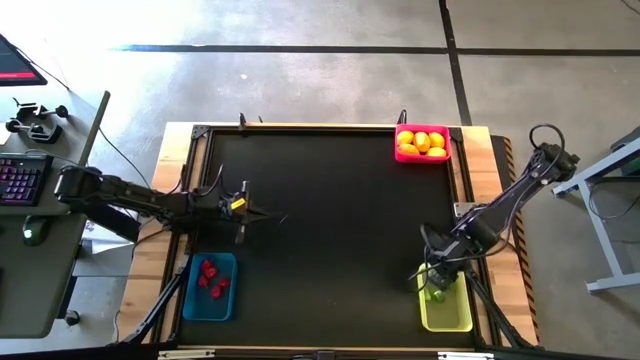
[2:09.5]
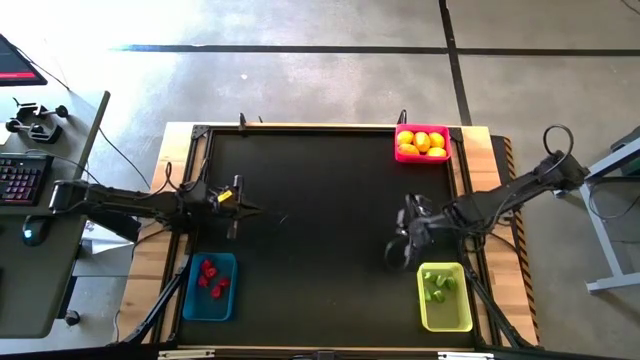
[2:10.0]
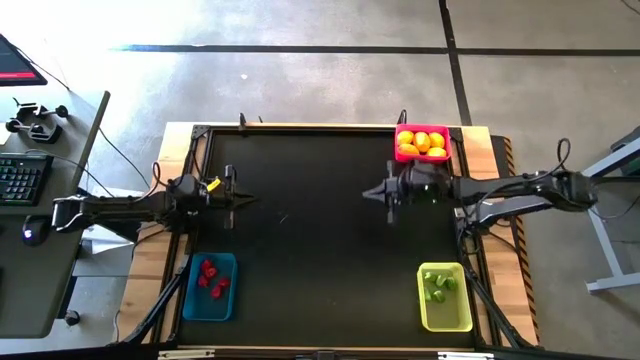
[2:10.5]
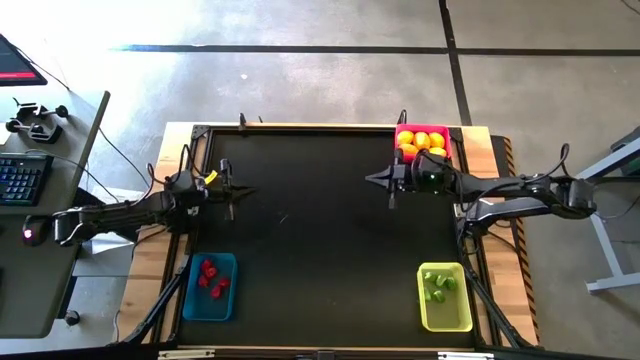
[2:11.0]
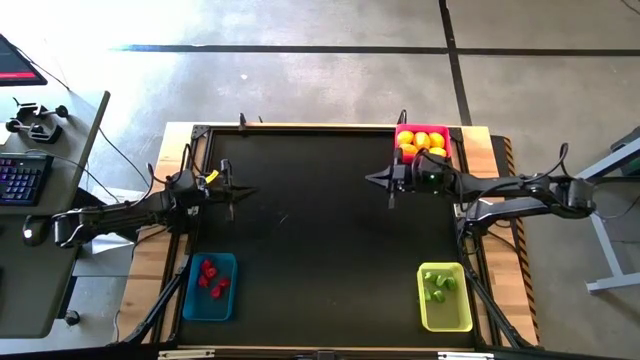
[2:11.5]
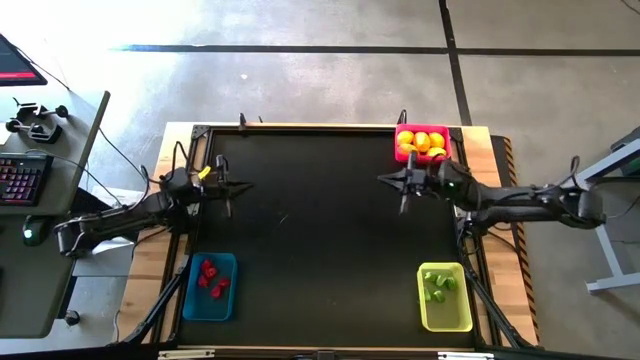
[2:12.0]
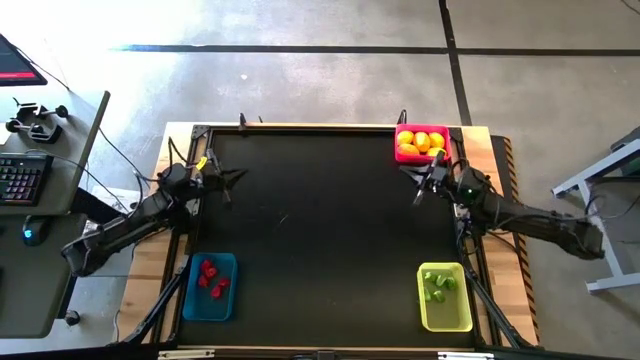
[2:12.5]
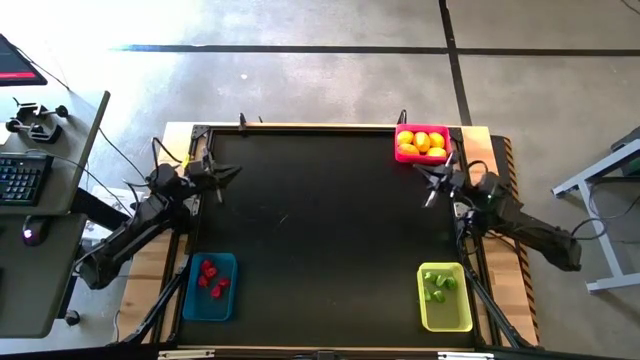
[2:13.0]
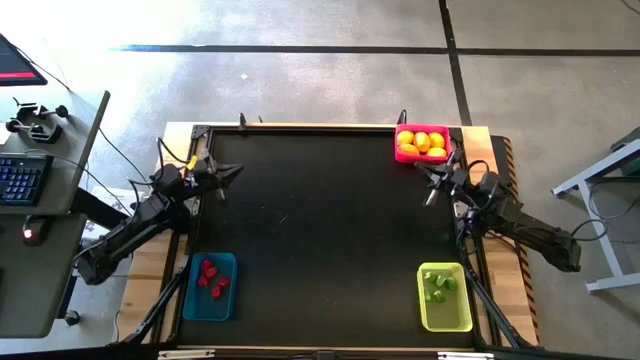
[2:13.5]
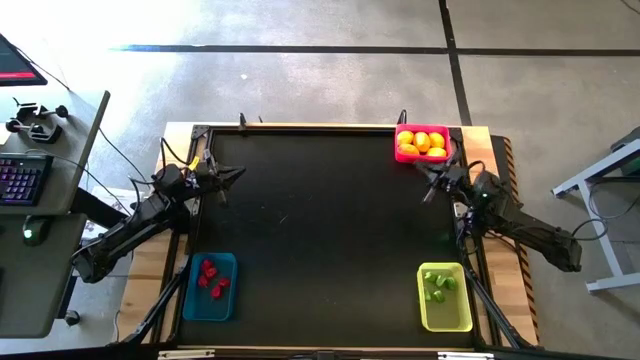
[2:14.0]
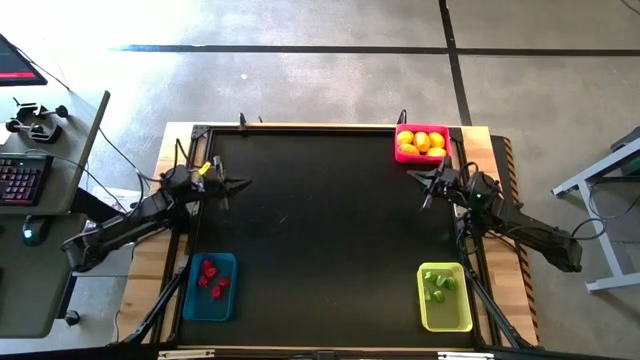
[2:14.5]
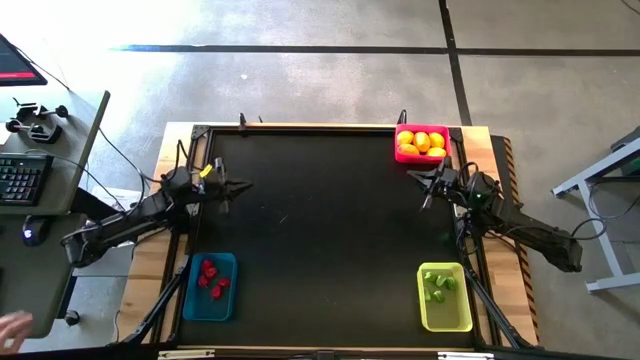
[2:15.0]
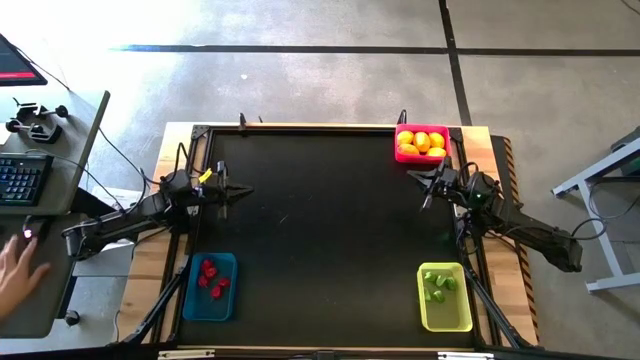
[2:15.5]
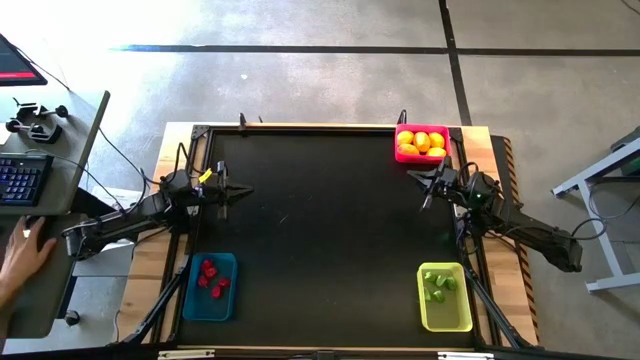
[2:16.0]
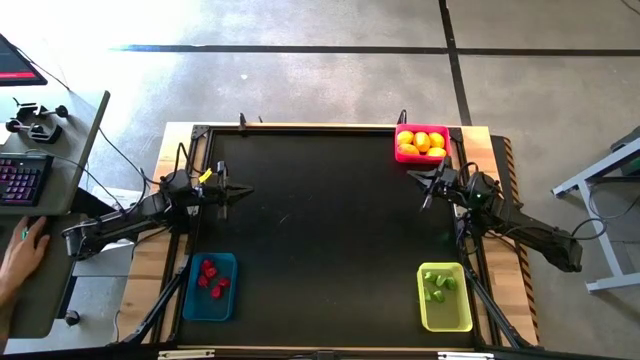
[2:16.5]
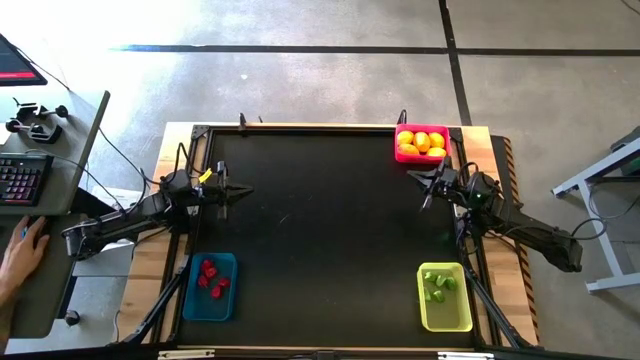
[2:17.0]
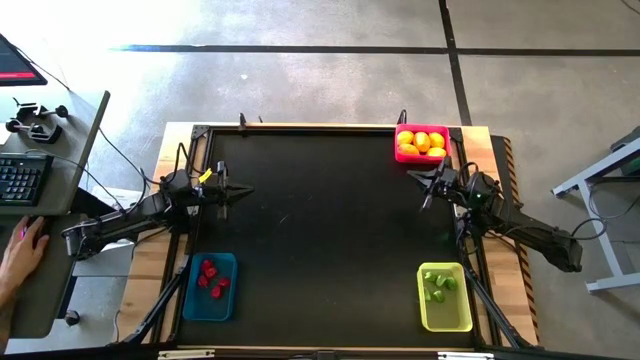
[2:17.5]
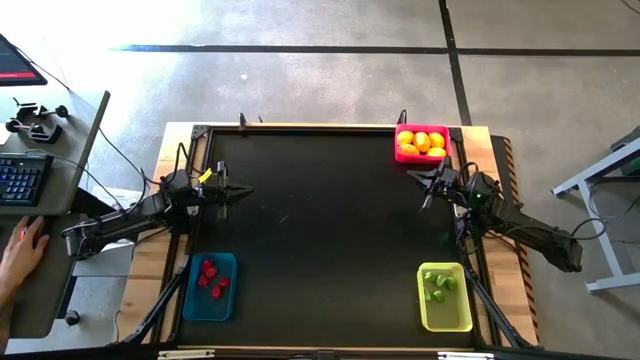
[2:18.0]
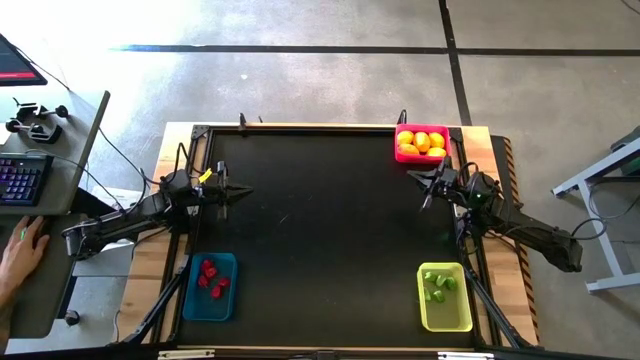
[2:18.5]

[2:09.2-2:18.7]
Task: Sort produce into baskets
Return to Home Position

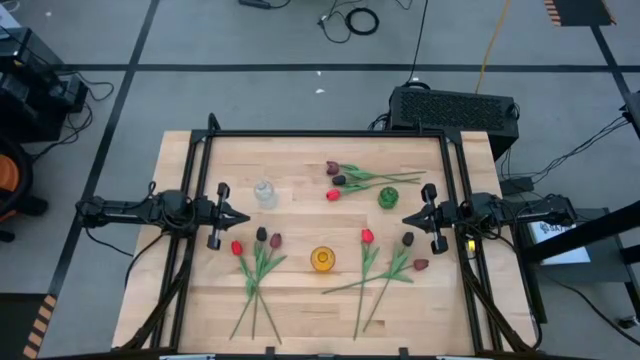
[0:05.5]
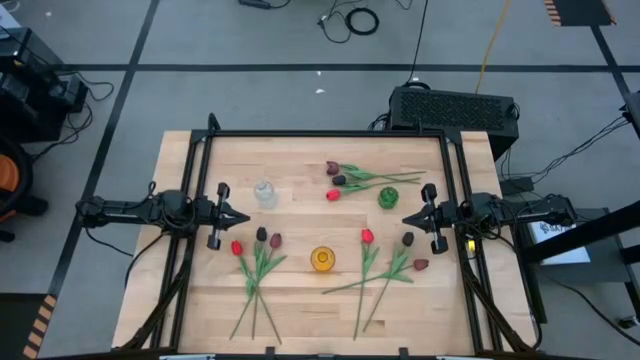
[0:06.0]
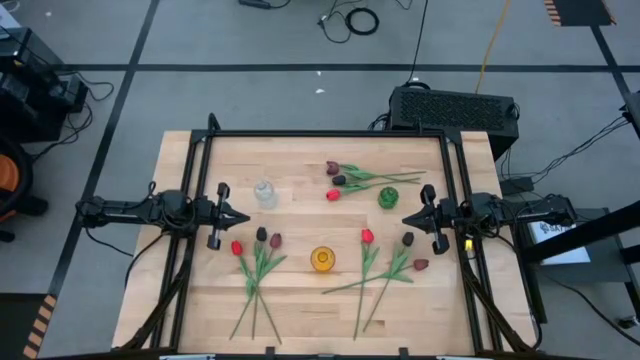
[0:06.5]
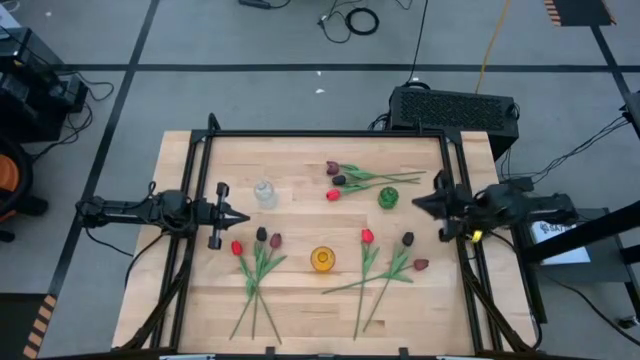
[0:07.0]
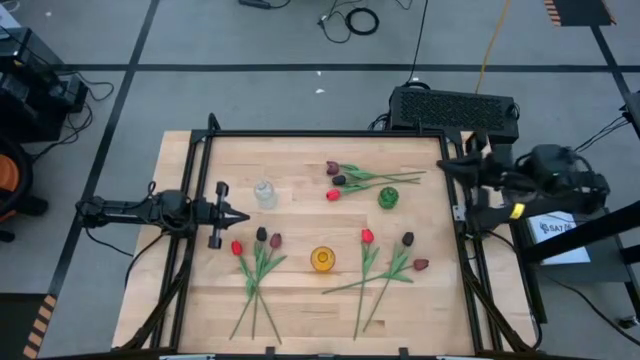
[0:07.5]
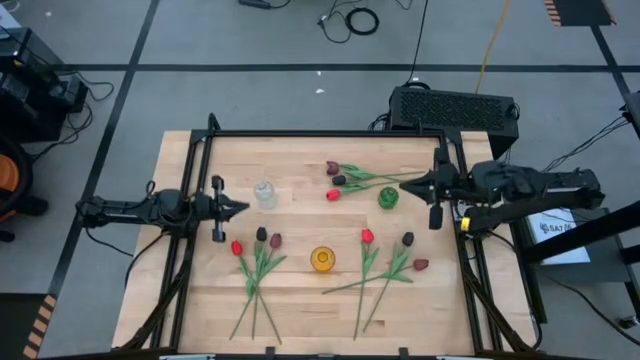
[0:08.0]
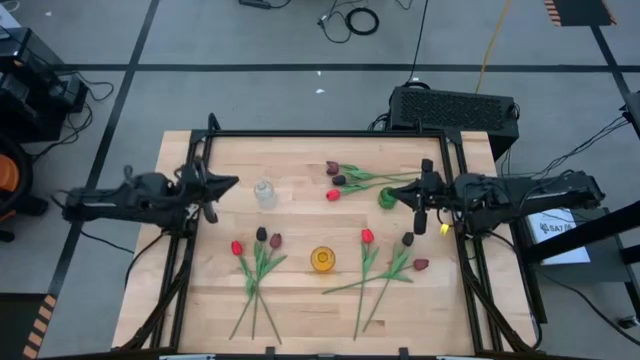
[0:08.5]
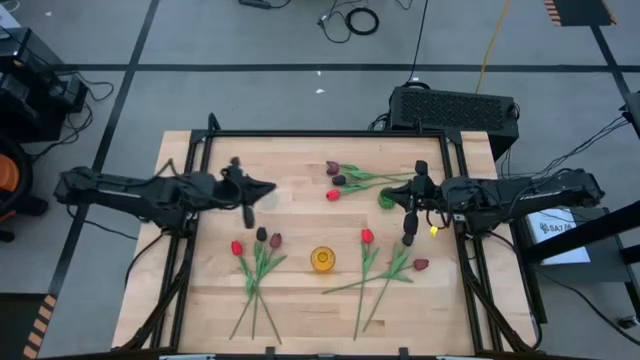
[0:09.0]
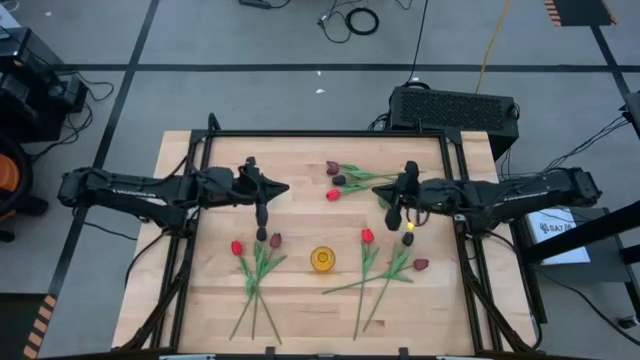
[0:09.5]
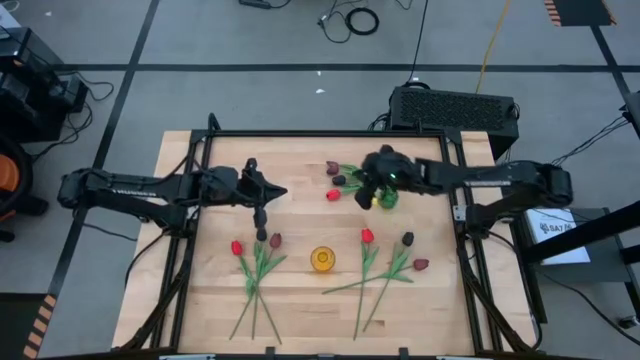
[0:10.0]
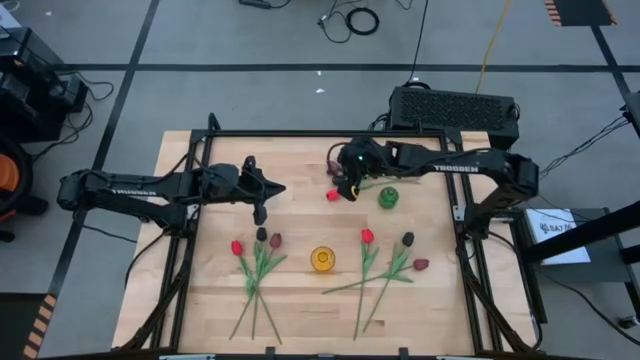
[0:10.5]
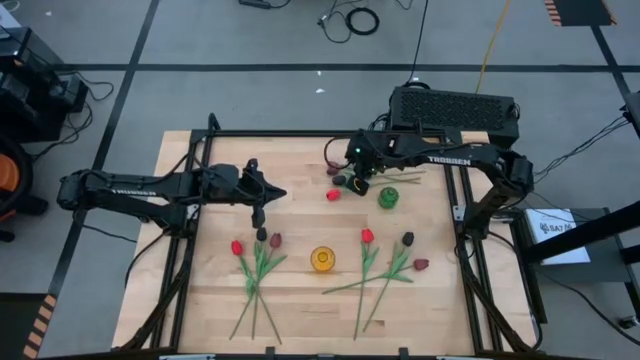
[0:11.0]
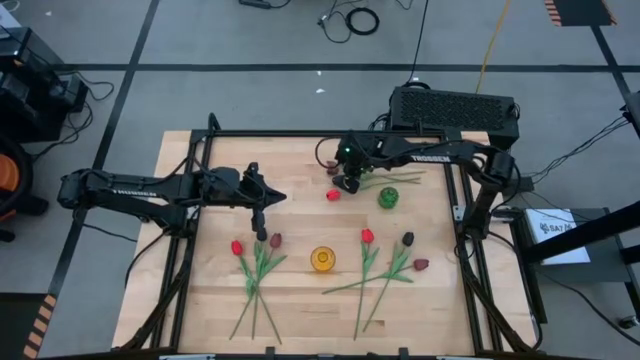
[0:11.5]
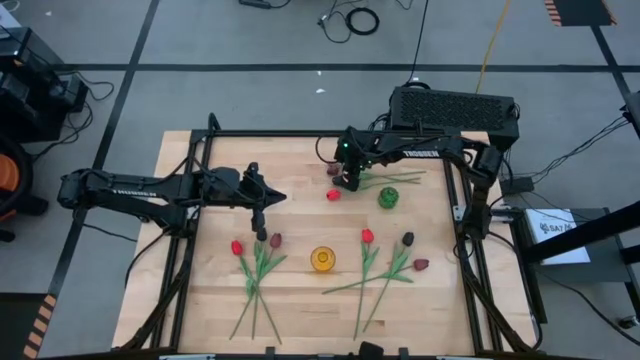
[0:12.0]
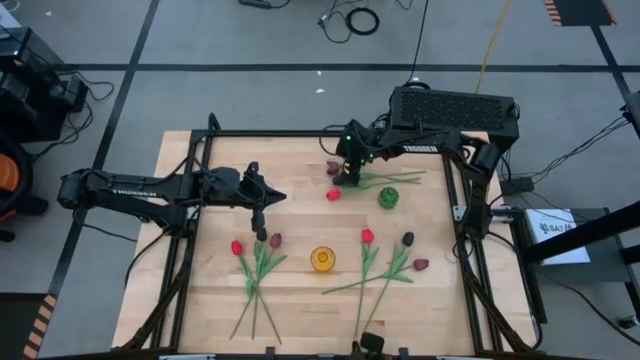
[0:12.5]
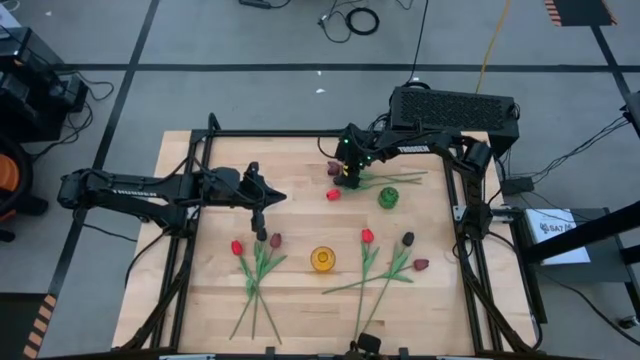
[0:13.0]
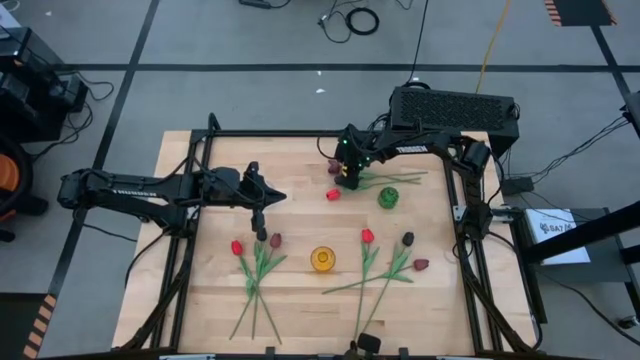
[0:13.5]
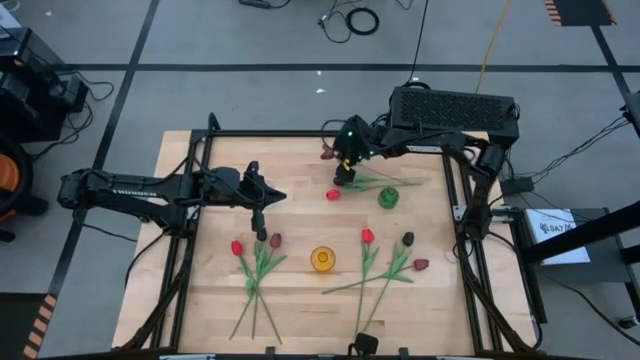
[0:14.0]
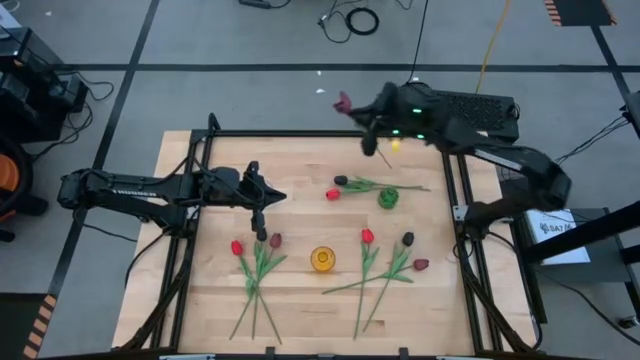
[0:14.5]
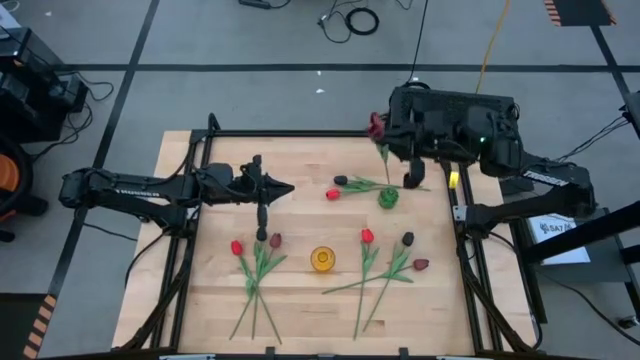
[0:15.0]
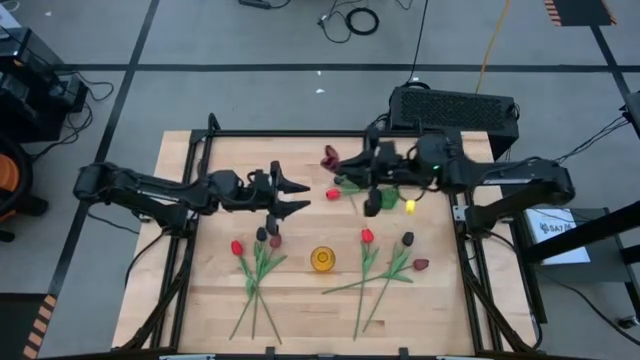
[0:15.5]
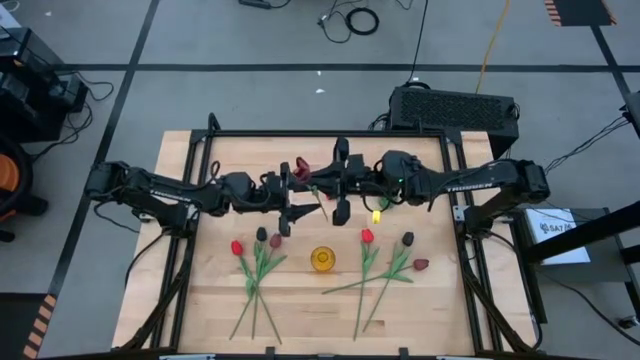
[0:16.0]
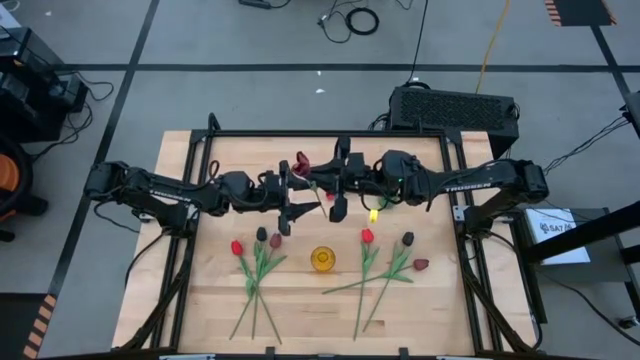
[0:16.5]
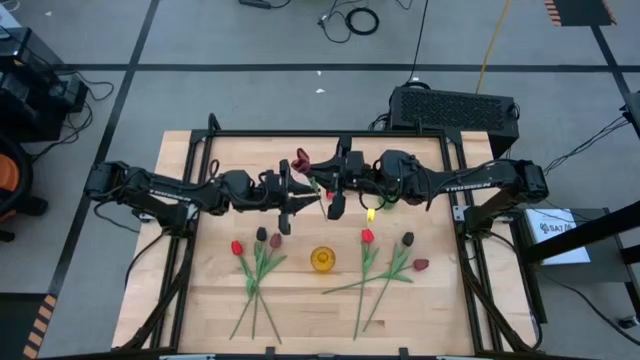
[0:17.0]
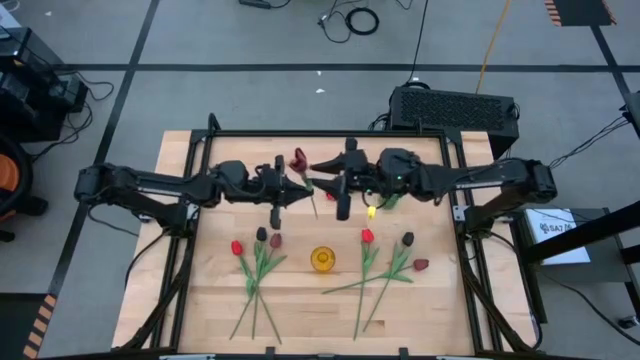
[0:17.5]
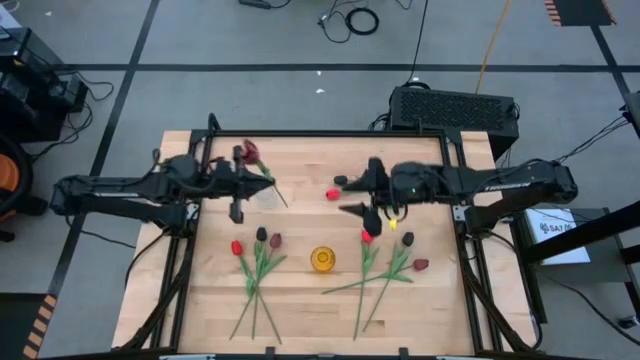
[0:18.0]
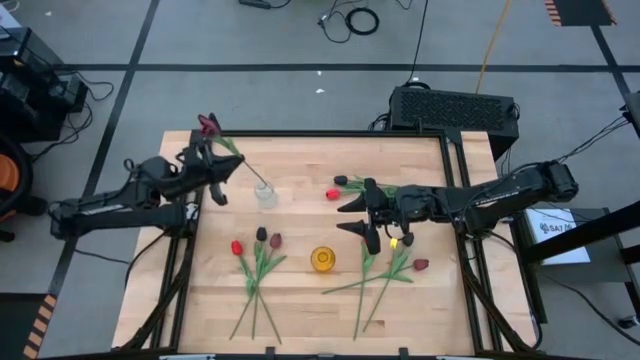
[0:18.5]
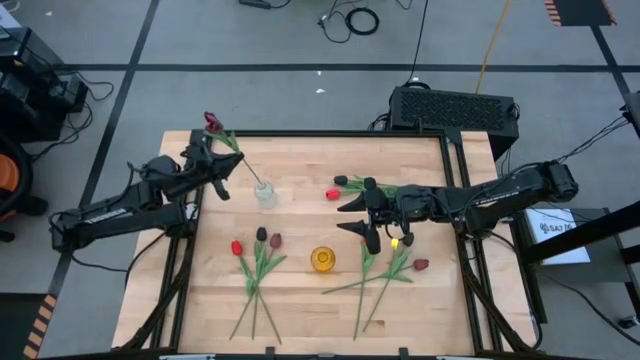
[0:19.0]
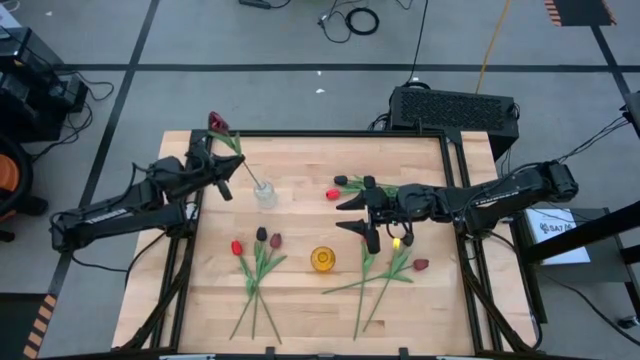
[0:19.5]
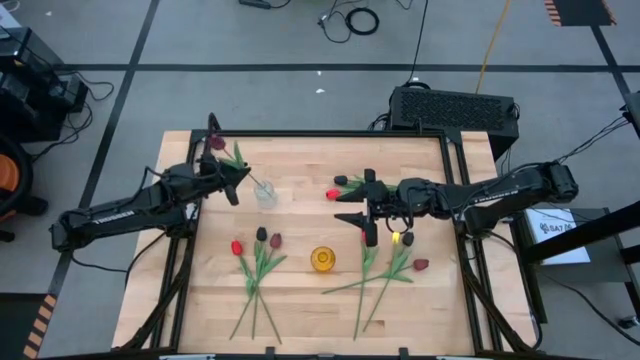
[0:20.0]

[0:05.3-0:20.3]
Task: Sort flowers into vase by color
Put the top dark red flower into the transparent vase
